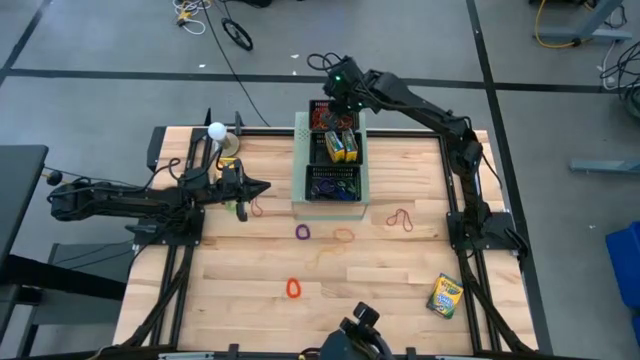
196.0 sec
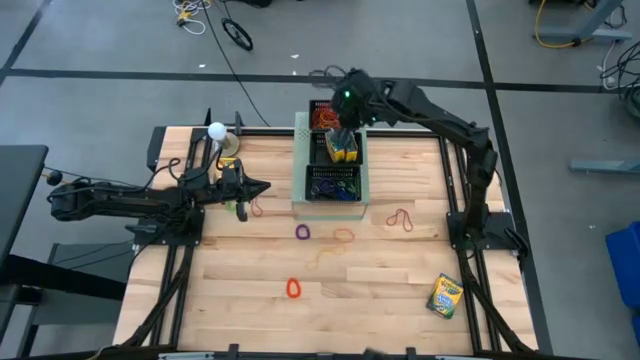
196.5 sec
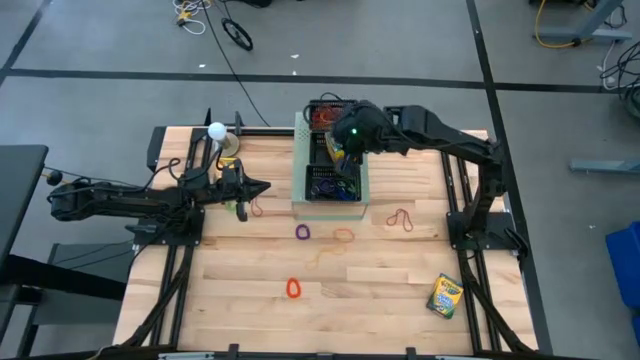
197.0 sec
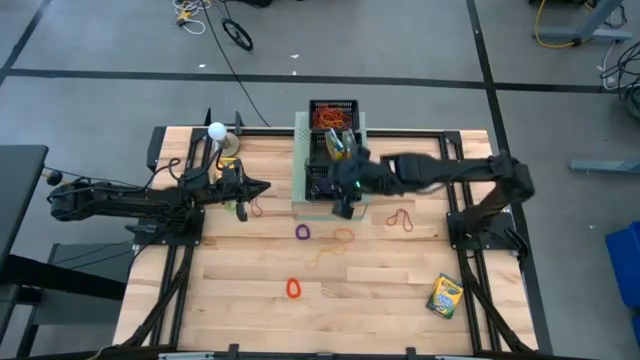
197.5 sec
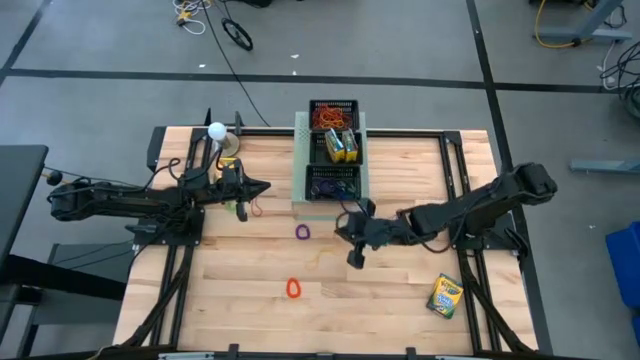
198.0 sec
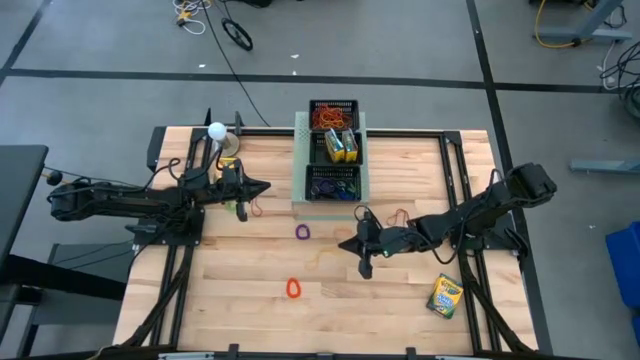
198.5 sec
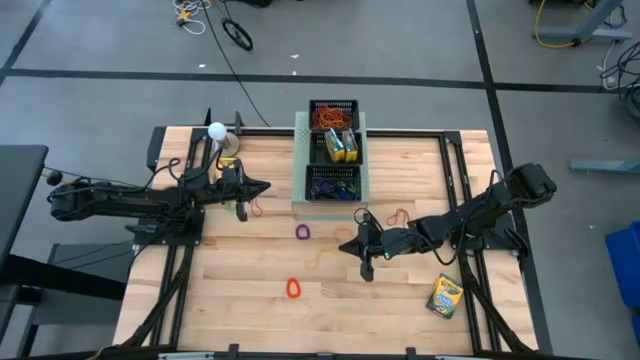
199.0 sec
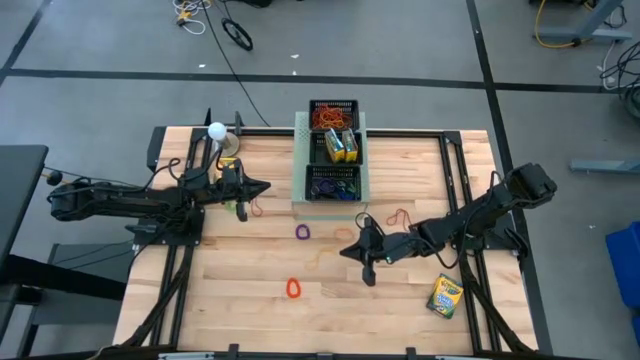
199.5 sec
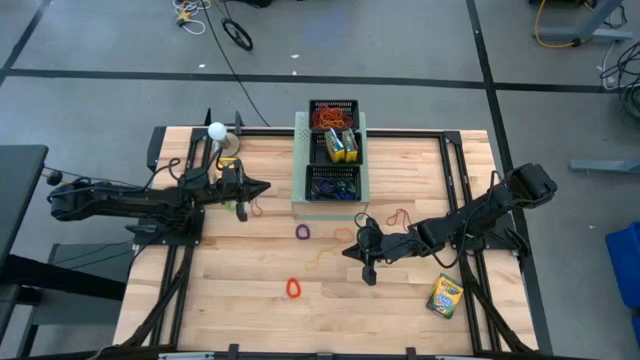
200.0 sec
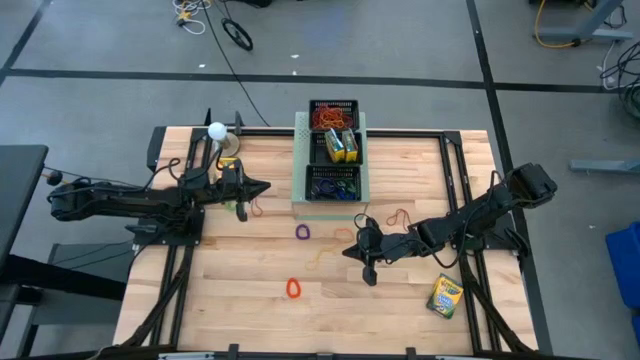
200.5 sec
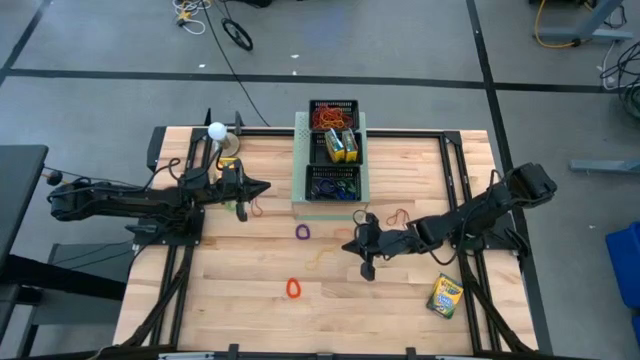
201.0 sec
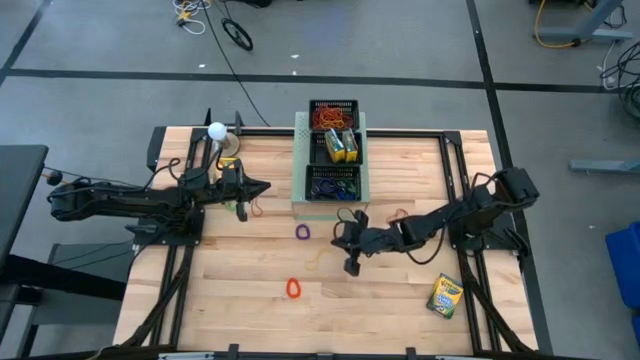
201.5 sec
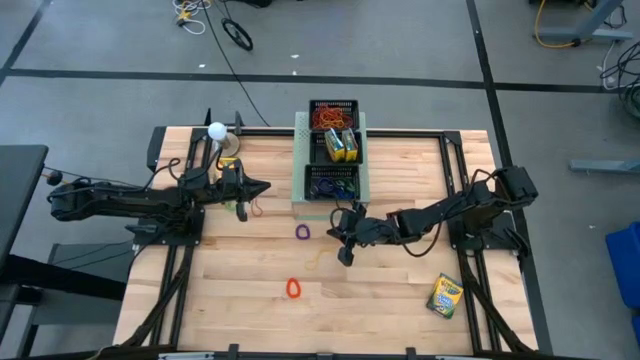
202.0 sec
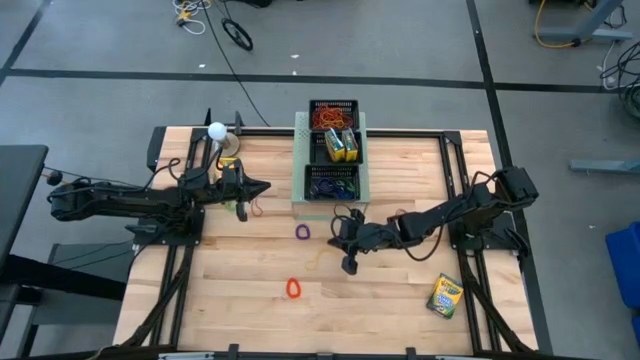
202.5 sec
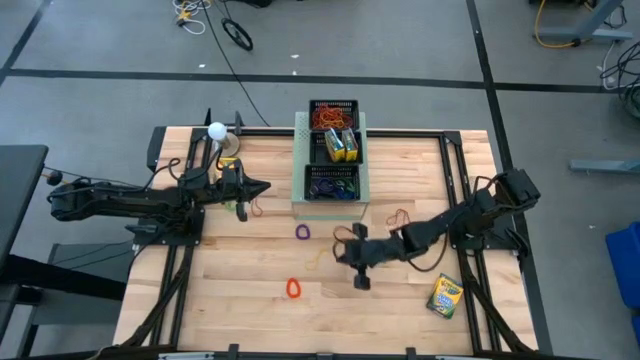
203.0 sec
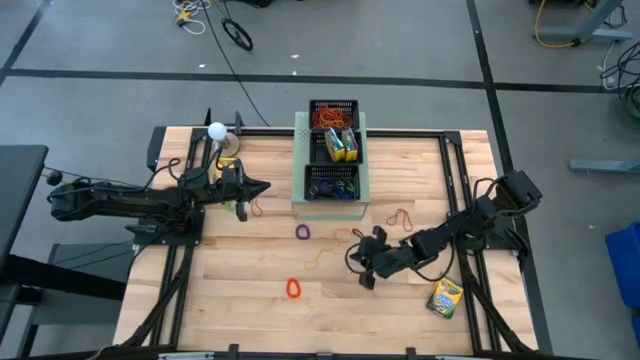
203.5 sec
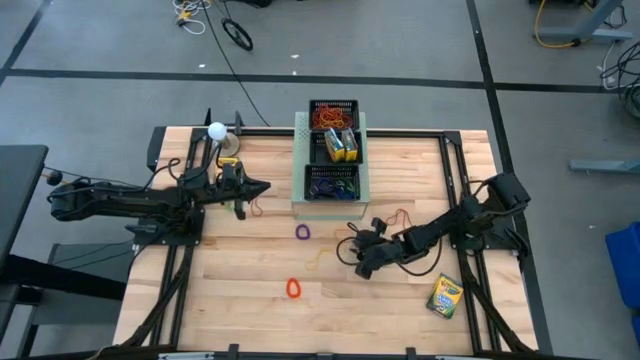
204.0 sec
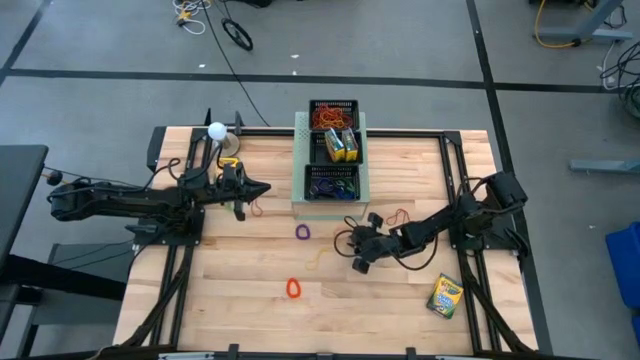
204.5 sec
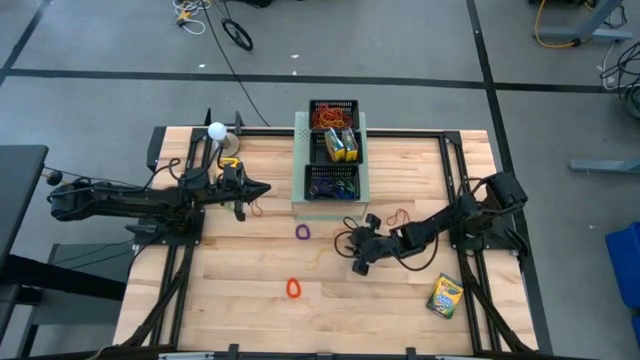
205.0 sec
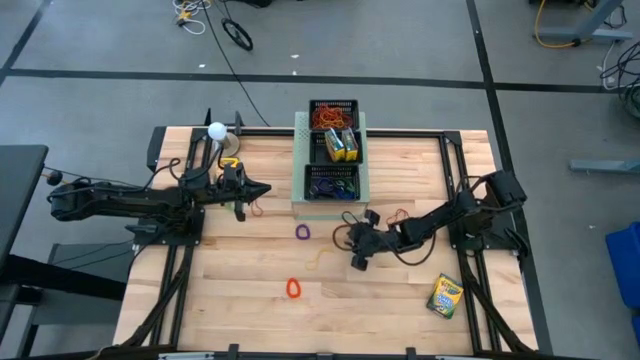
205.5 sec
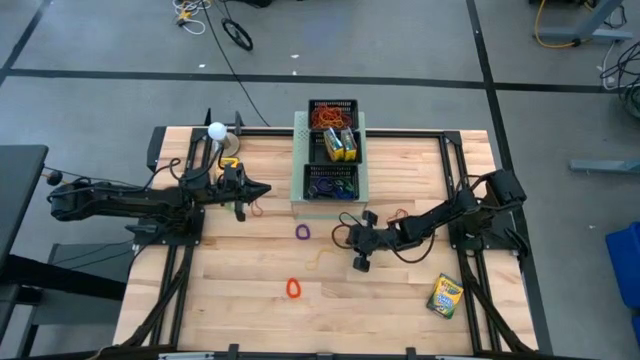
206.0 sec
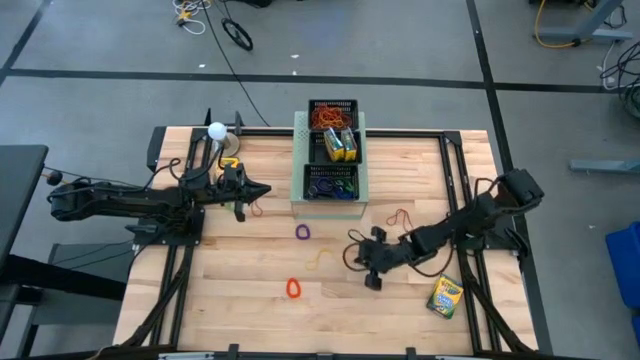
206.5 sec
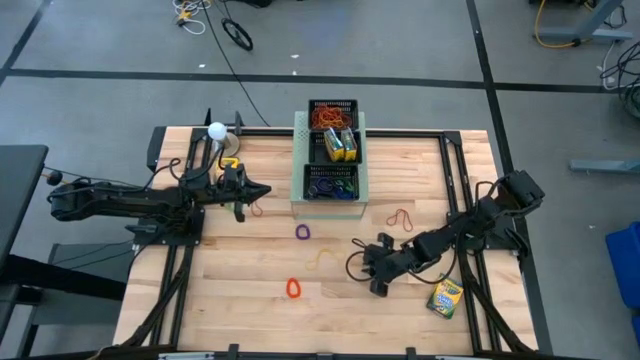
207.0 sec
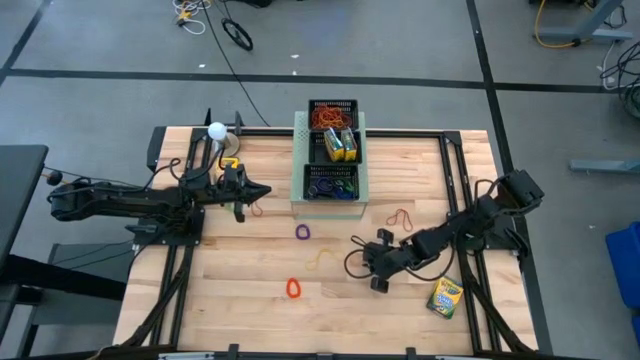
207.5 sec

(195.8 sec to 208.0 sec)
Task: Pick & Place Office Desk Supplies
Put the orange rubber band into the top black bin on the shelf

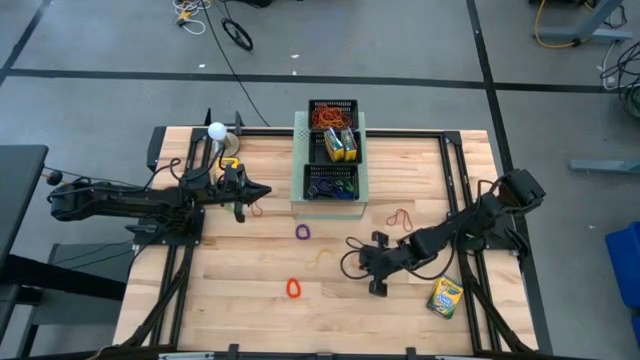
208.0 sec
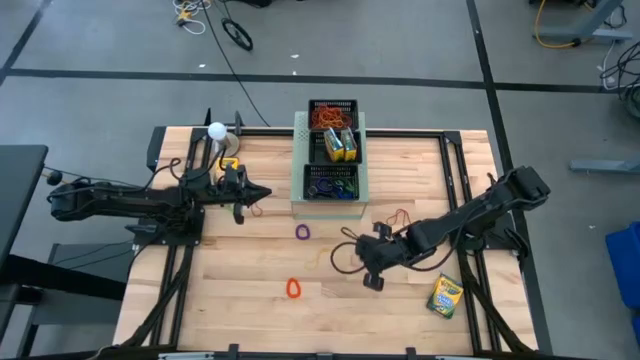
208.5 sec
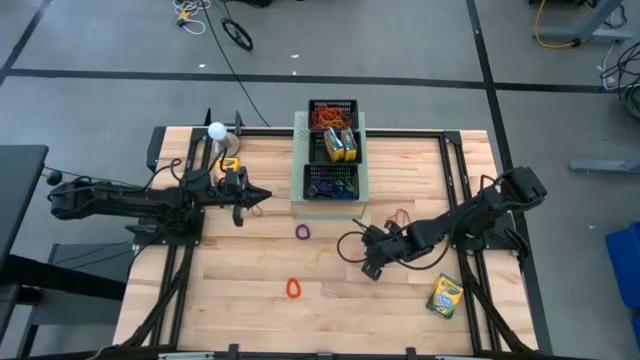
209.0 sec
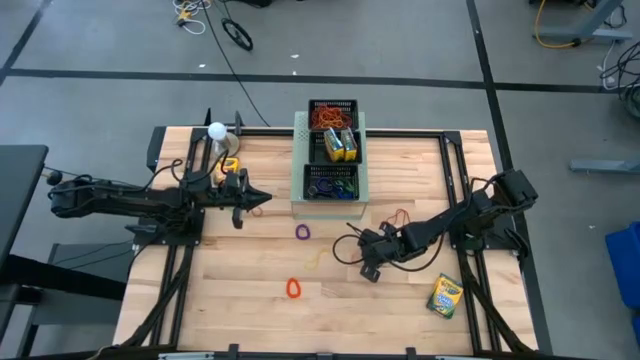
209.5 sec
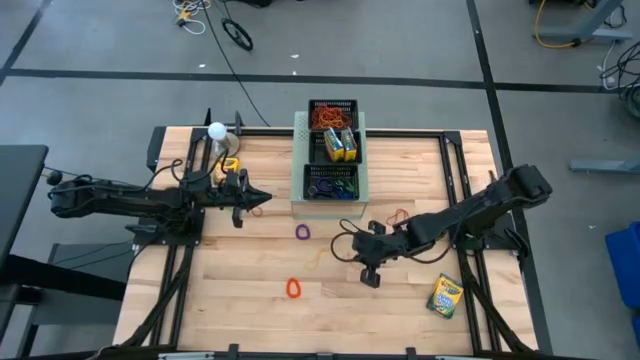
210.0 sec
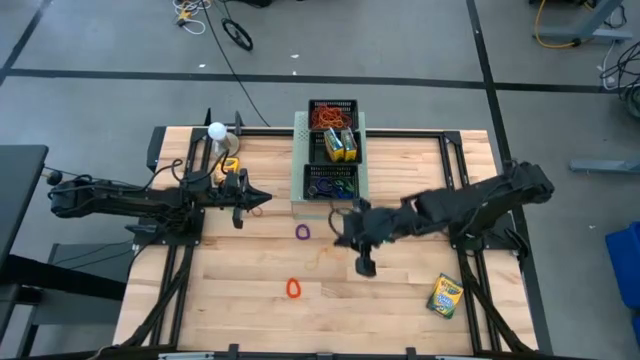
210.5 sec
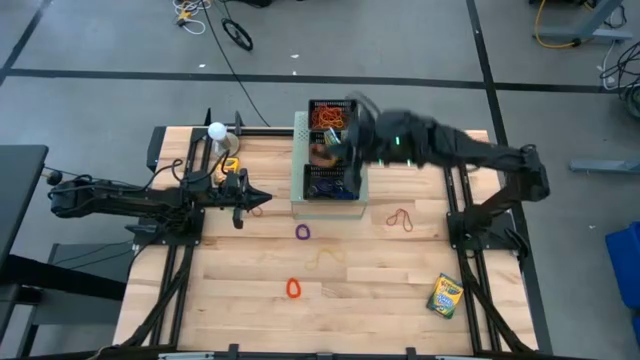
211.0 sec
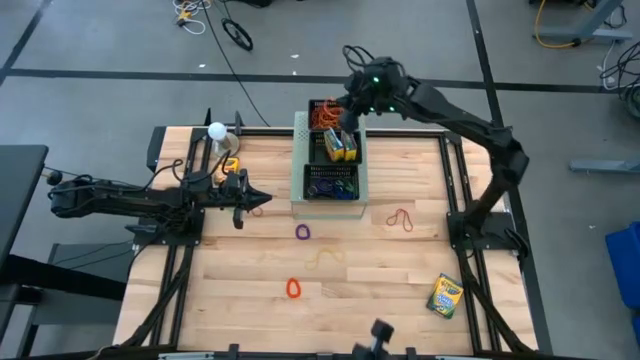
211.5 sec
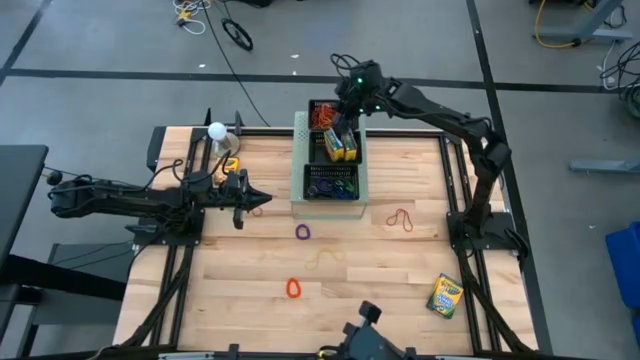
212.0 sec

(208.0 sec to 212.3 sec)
Put the orange rubber band into the top black bin on the shelf

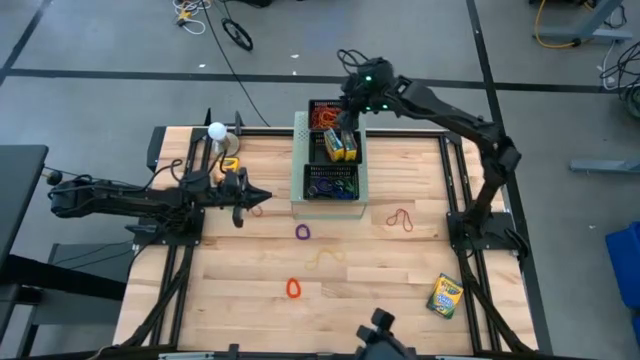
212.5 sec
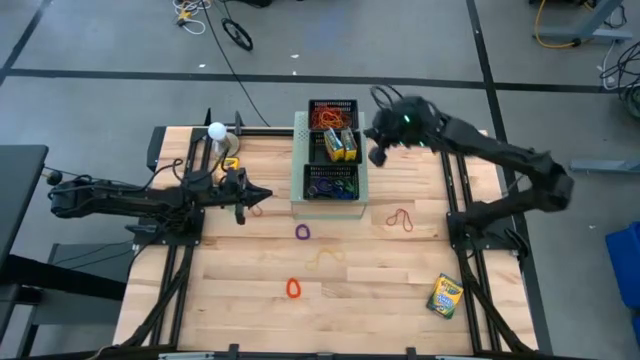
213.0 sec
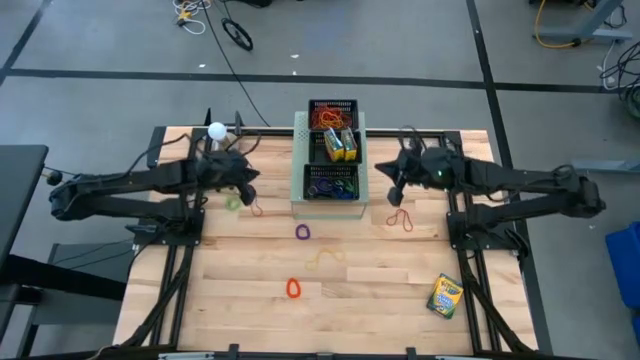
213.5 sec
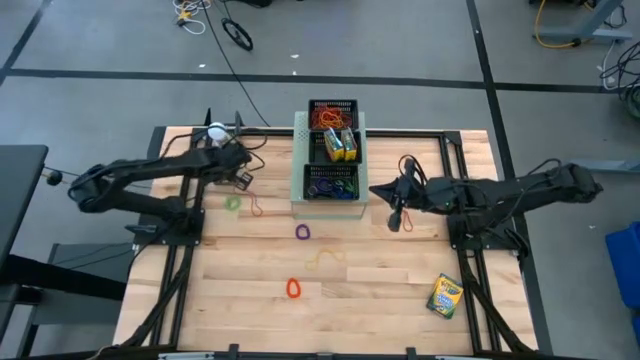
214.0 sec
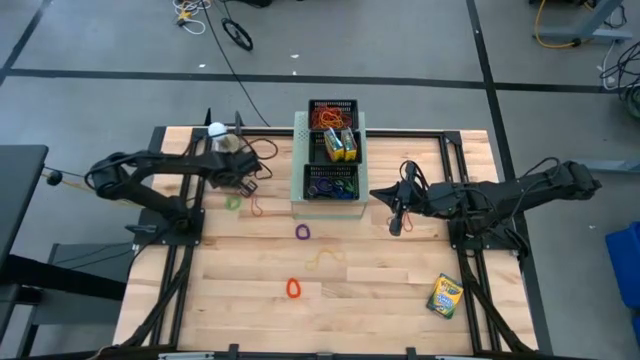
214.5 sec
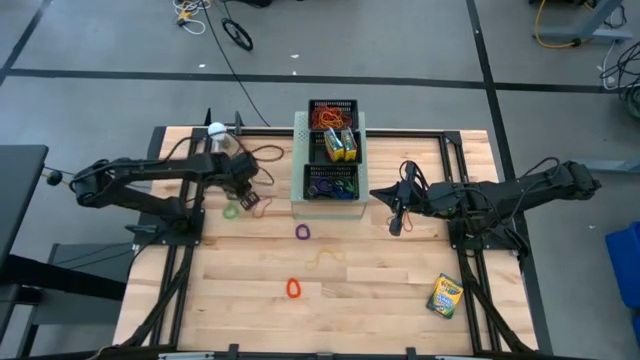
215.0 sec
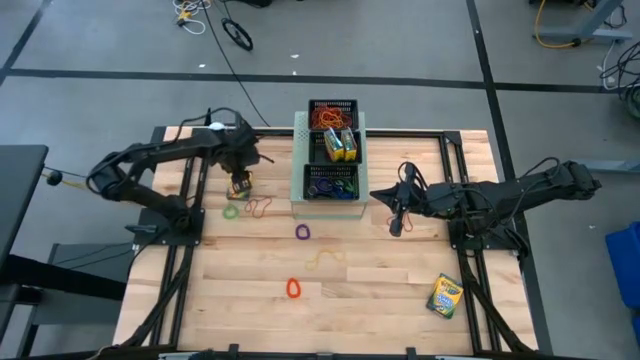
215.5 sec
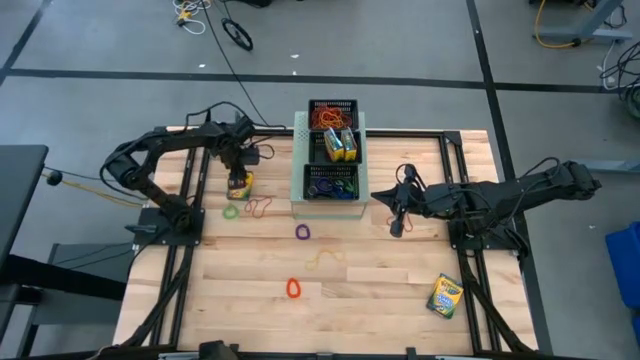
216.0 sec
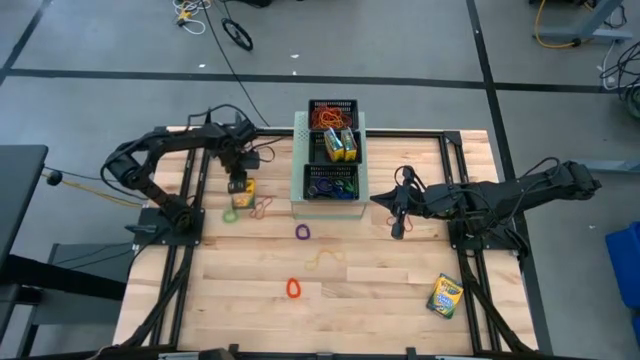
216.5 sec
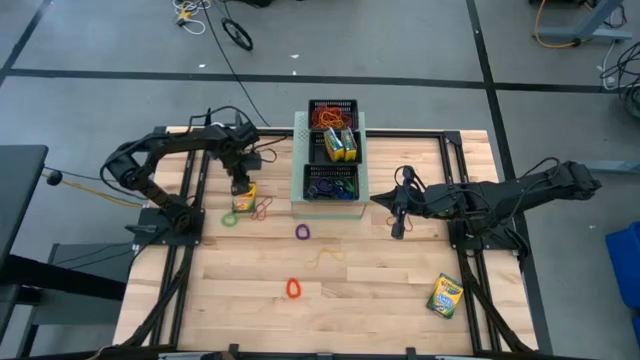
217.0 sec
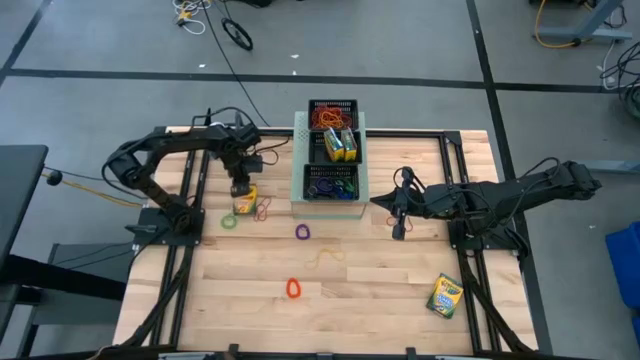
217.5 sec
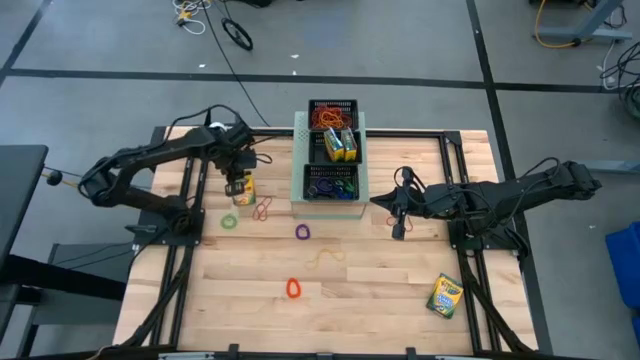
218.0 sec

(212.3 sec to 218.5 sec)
Put the top yellow crayon box into the middle black bin on the shelf
